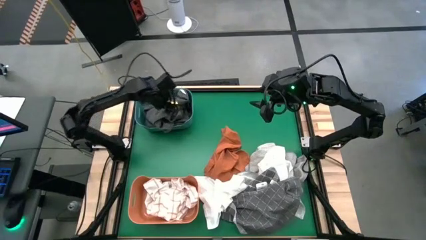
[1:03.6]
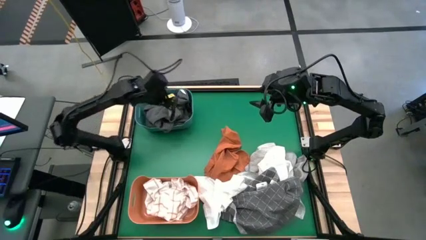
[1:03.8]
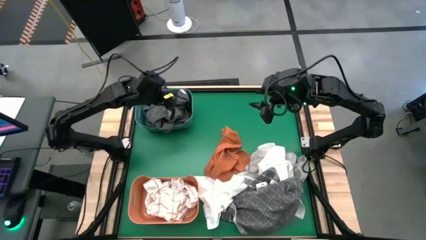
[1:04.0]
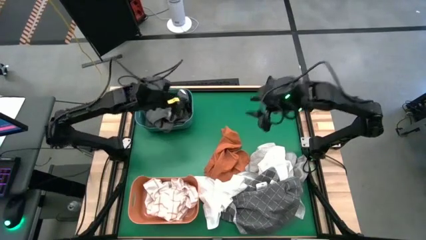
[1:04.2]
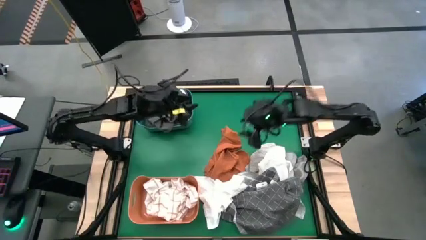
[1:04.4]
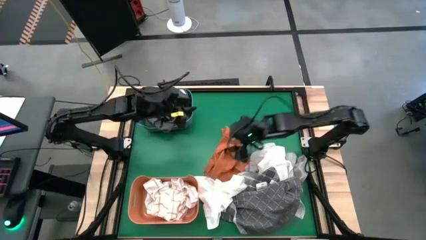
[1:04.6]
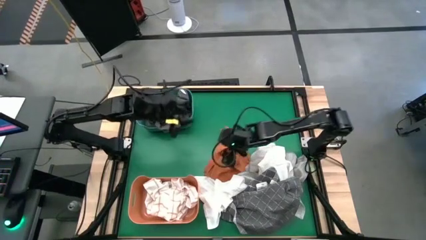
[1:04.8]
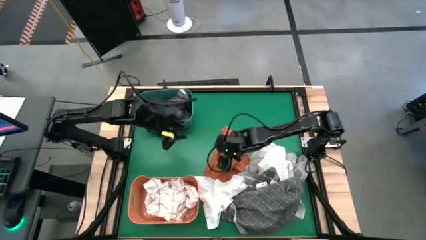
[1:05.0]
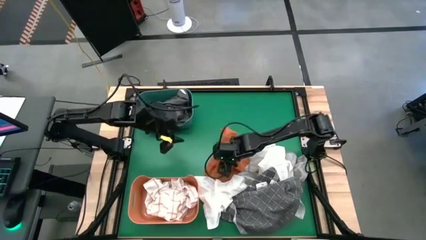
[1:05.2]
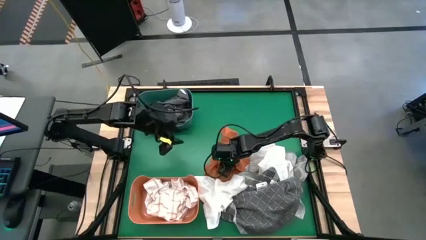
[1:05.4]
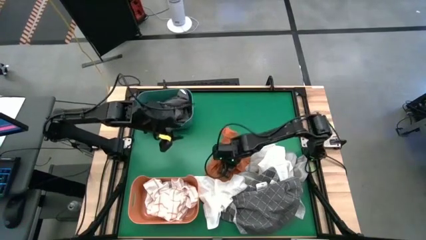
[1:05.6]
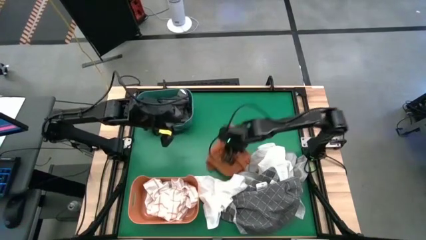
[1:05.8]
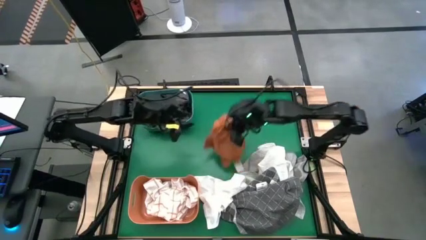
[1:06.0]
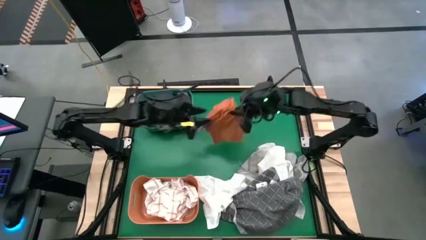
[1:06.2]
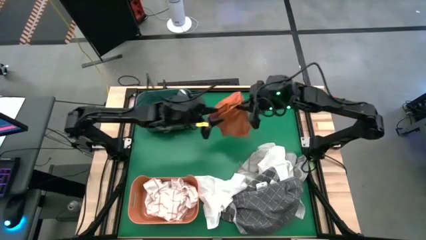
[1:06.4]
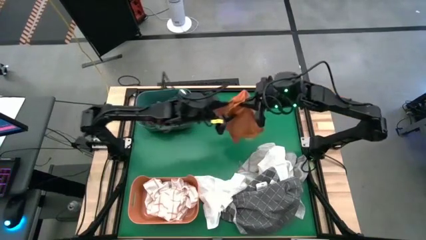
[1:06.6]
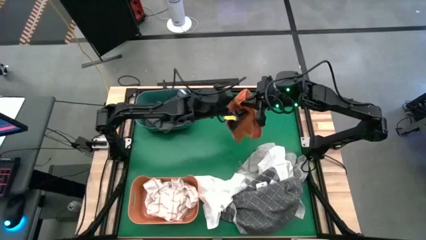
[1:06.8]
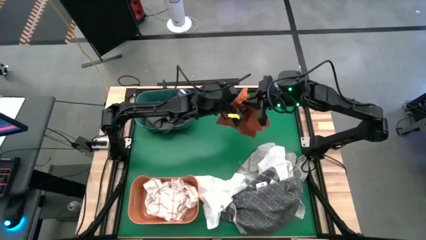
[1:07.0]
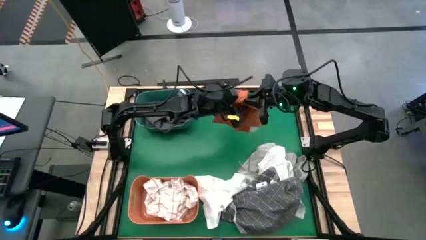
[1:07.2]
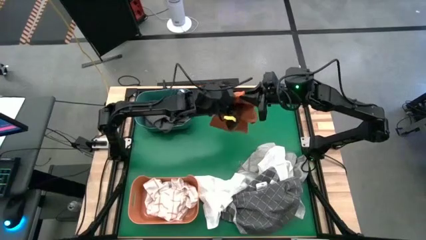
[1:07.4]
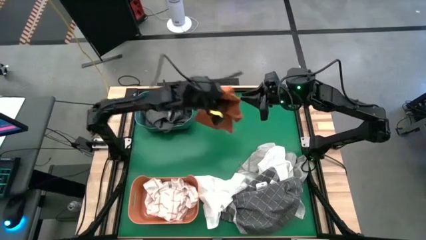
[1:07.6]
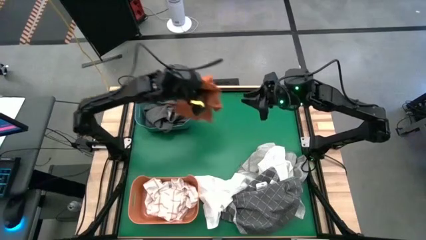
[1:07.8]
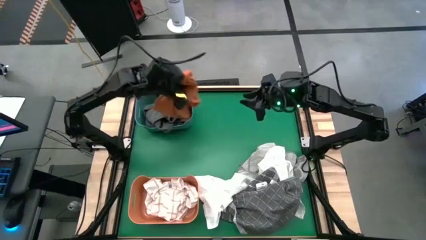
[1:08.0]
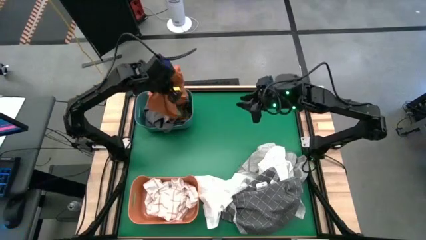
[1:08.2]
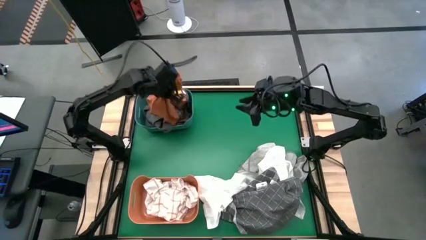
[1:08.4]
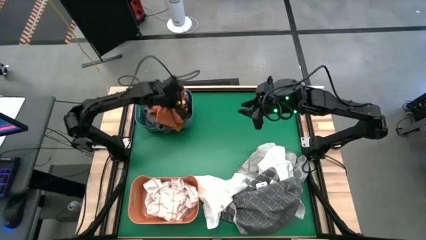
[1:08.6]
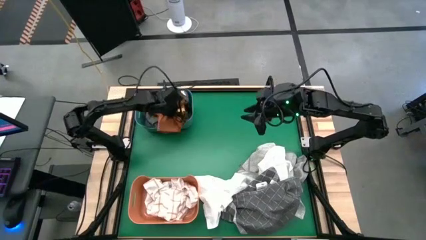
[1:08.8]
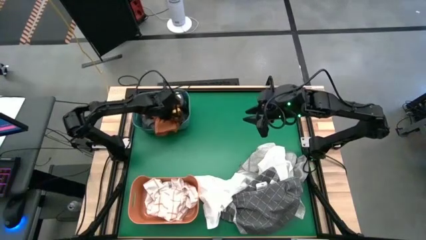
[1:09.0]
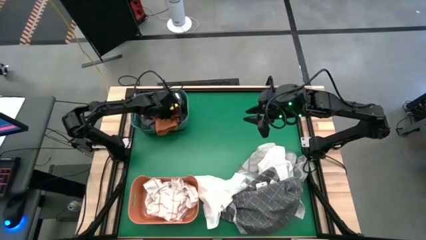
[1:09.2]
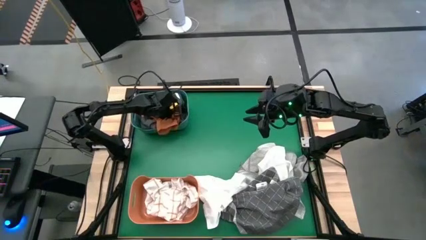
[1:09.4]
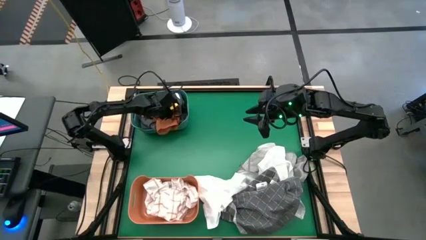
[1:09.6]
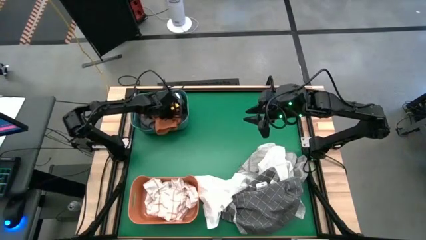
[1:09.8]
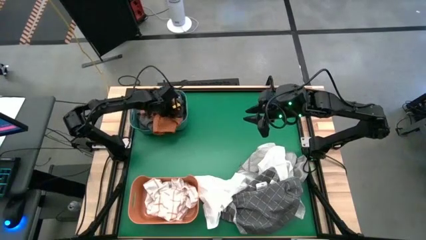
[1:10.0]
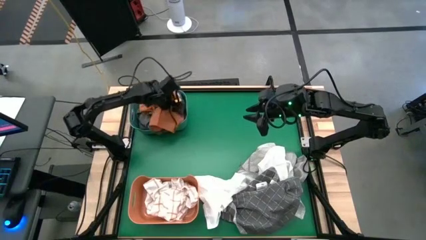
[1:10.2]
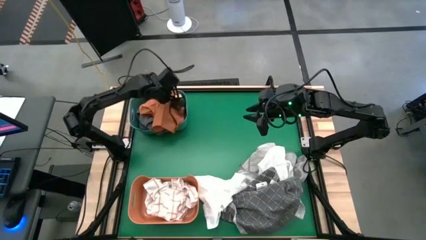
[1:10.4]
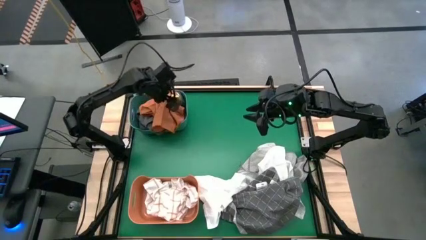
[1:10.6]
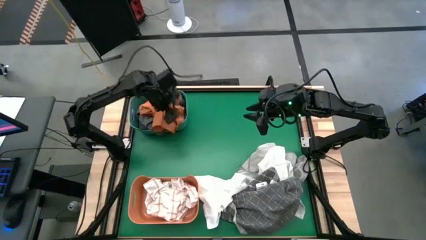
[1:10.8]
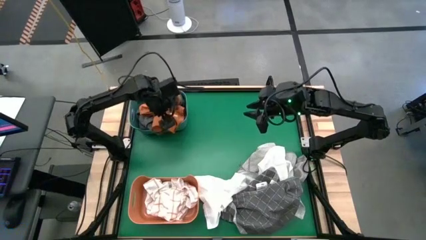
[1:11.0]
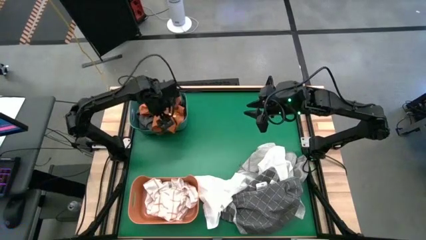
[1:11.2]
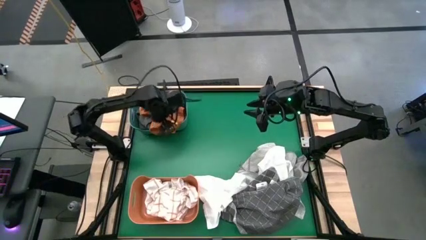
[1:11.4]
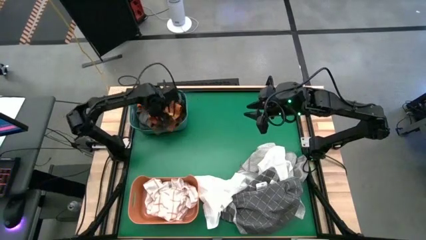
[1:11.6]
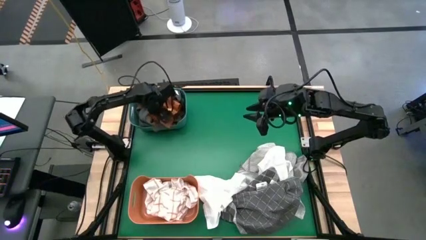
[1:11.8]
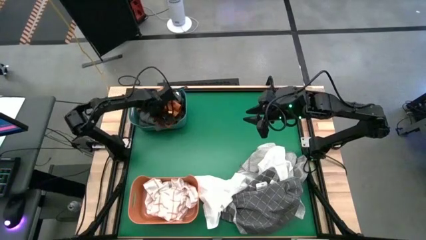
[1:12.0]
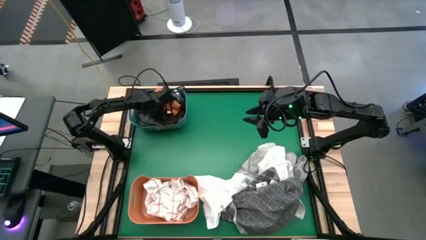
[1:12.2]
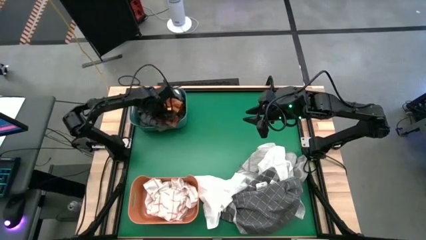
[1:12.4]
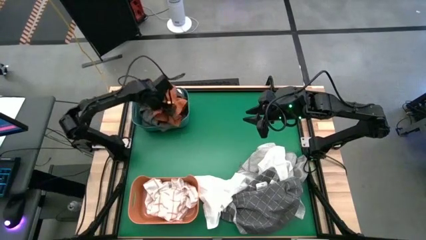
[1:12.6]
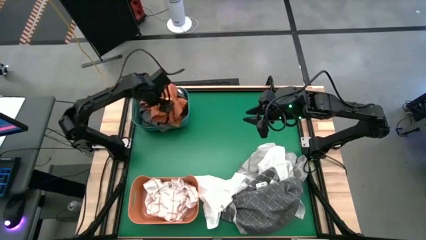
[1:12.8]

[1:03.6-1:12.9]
Task: Sort microfiber towel by color & place in baskets
Put the left orange microfiber towel into the green bin

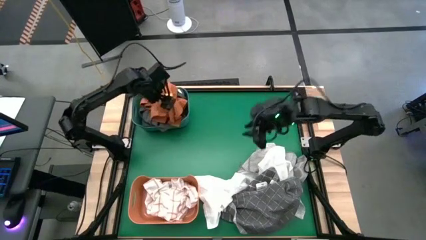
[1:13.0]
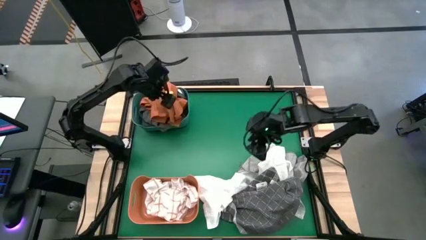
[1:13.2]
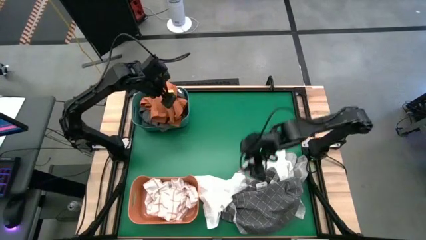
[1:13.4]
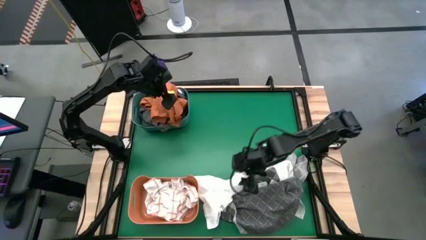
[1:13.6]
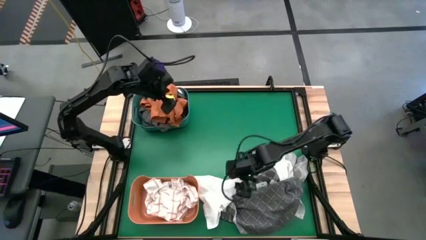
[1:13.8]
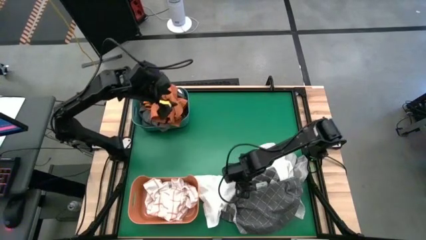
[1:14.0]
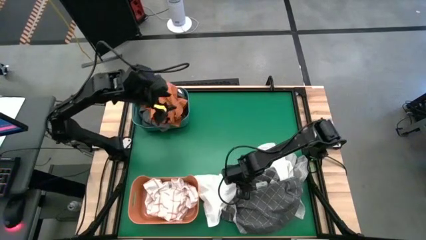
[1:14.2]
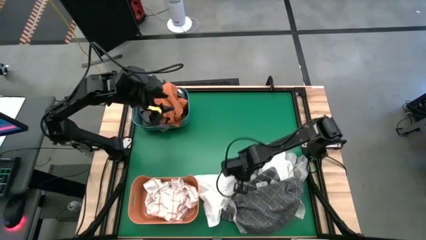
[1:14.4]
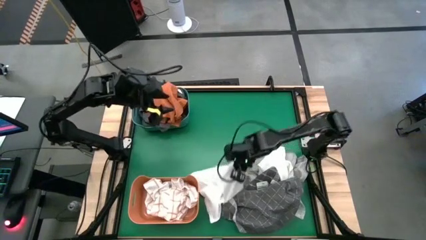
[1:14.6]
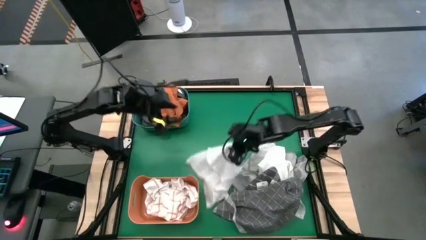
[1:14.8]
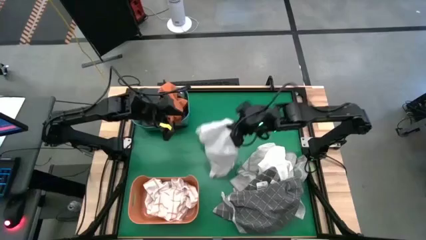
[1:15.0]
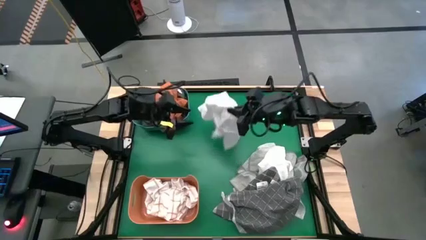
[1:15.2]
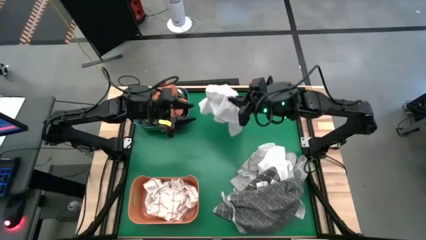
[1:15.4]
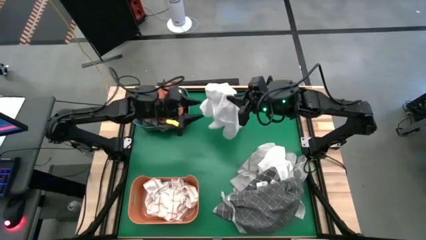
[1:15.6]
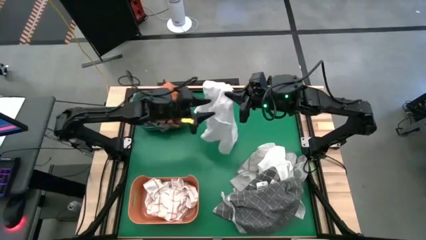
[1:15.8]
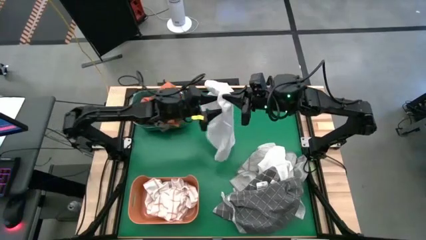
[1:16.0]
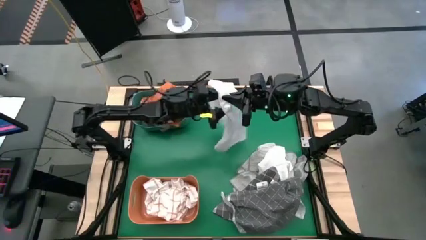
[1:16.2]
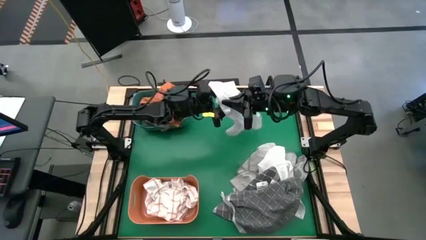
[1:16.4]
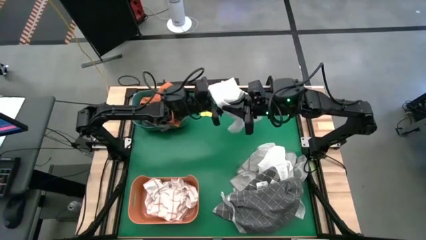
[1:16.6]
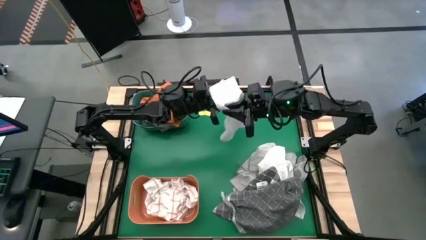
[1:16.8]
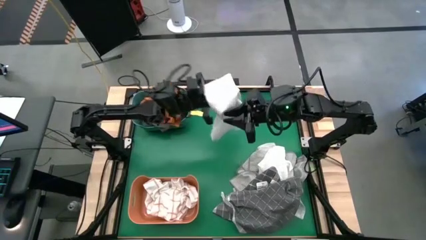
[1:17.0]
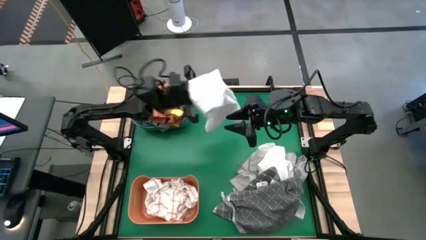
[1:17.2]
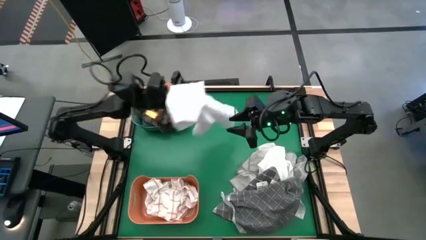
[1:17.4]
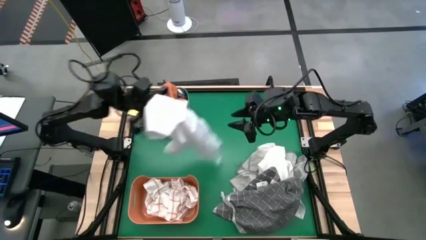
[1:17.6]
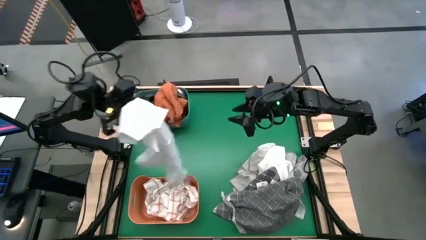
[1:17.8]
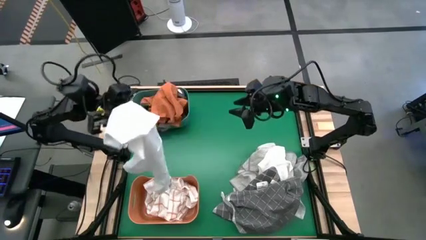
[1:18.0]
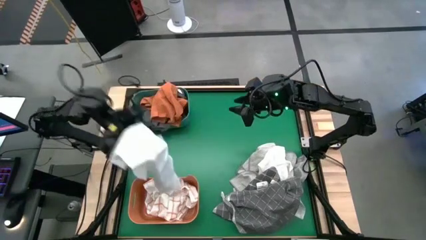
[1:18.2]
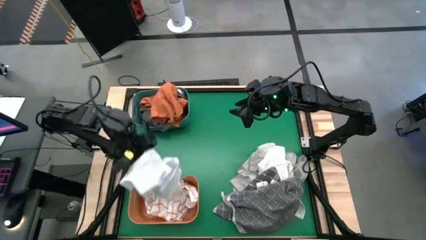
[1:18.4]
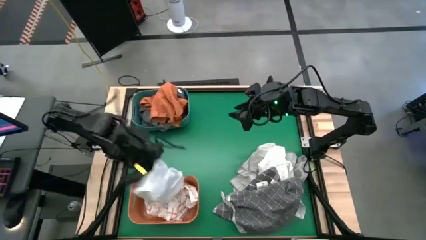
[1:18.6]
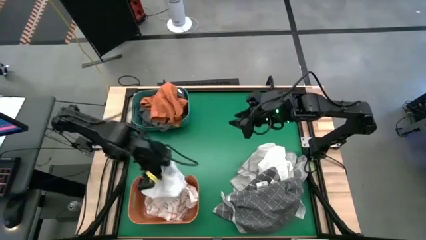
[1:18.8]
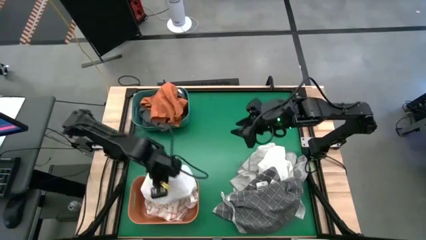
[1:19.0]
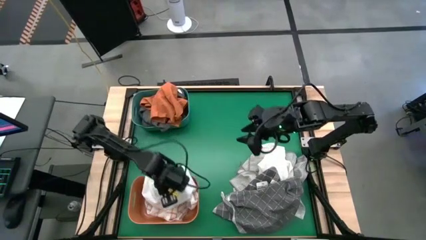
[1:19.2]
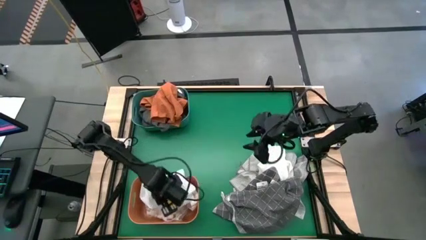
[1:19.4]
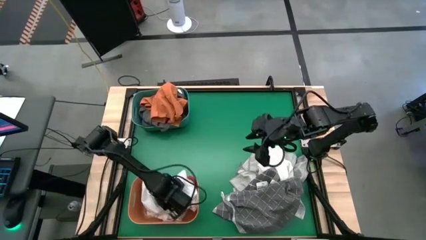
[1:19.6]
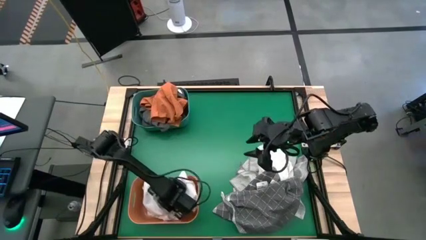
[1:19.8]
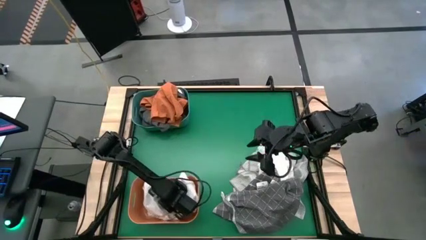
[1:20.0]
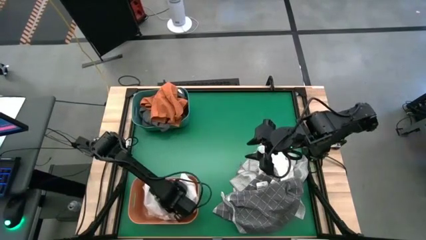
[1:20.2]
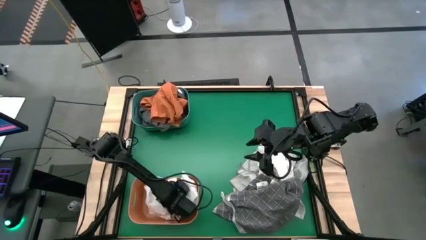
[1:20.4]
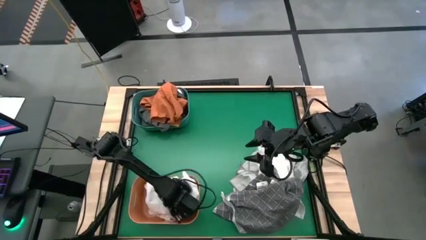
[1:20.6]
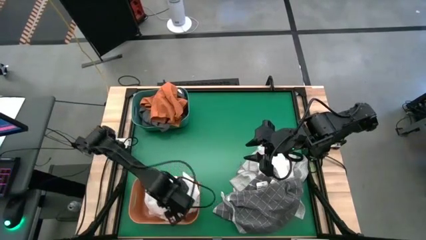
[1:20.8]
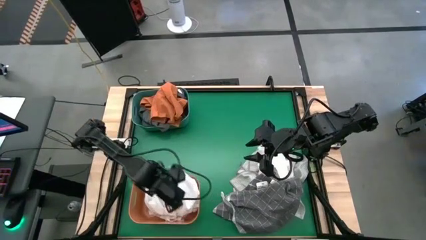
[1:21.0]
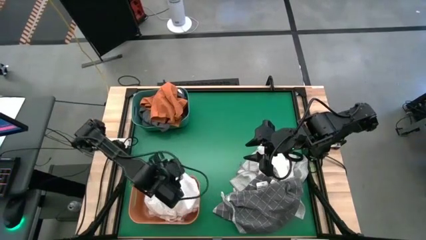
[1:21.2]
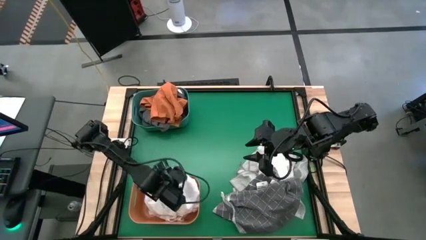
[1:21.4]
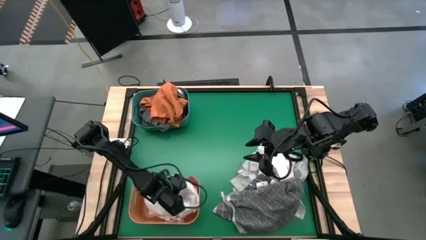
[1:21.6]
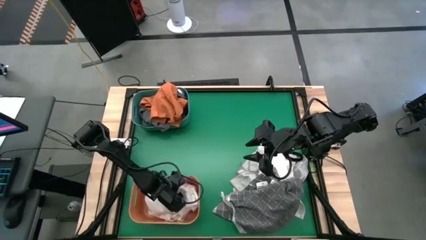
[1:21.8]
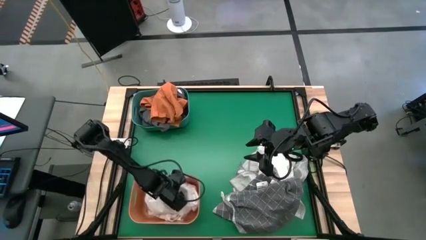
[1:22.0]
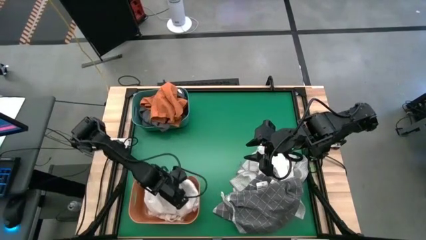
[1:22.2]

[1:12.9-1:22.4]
Put the left white microfiber towel into the orange bin
